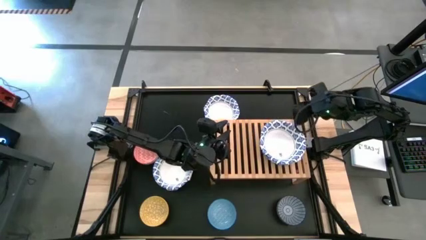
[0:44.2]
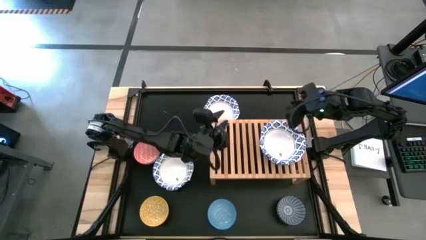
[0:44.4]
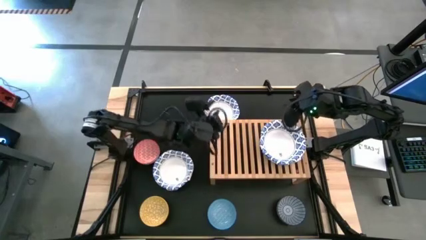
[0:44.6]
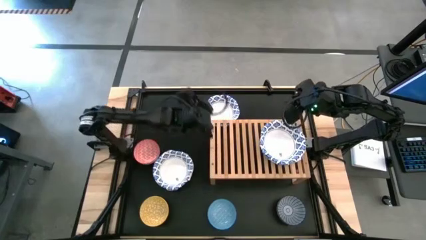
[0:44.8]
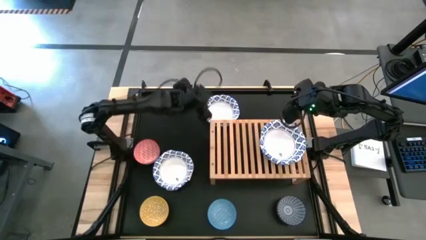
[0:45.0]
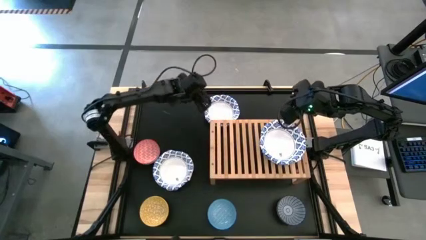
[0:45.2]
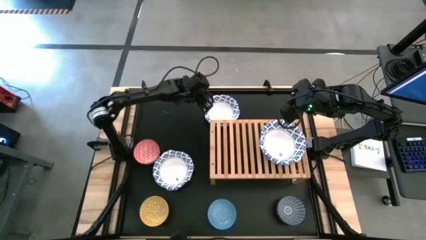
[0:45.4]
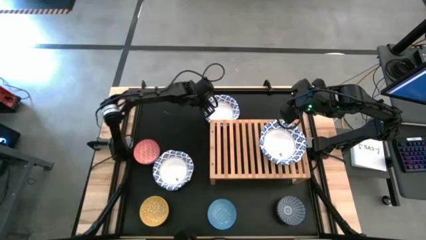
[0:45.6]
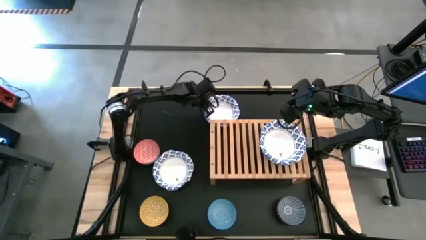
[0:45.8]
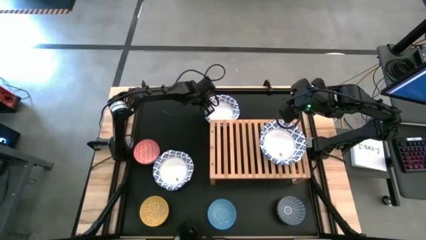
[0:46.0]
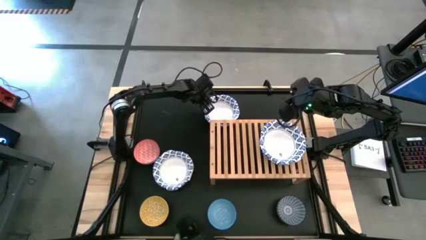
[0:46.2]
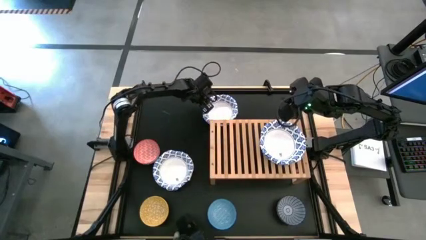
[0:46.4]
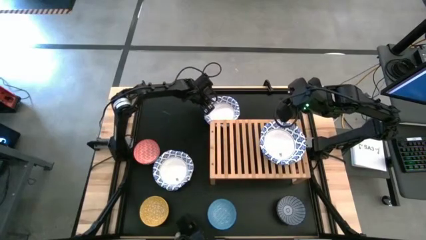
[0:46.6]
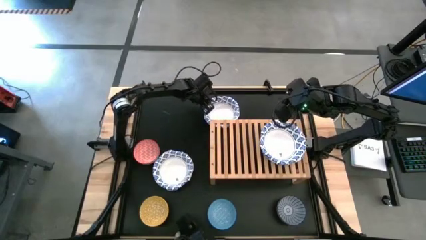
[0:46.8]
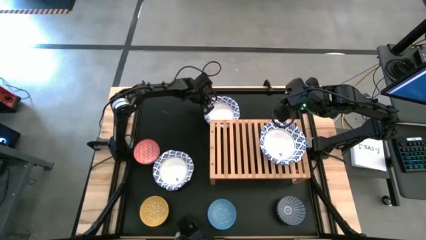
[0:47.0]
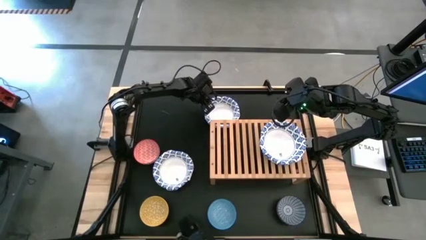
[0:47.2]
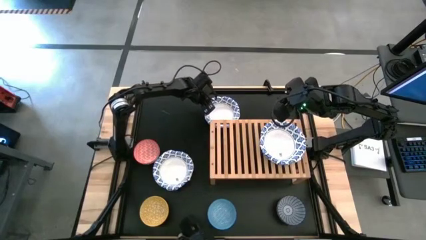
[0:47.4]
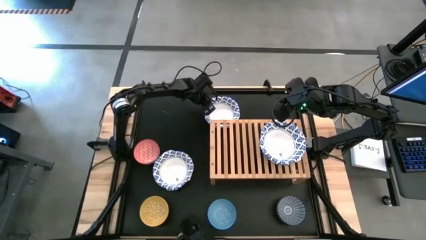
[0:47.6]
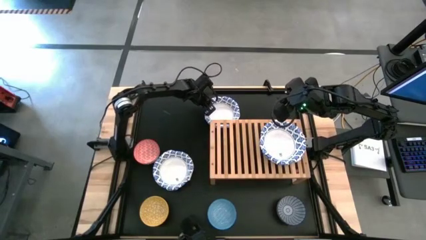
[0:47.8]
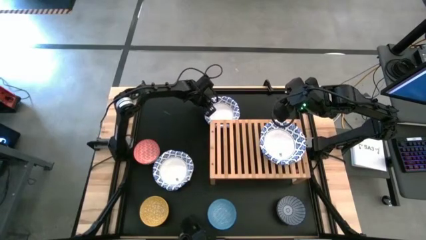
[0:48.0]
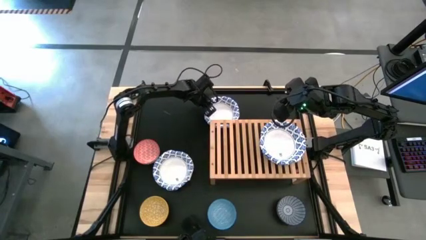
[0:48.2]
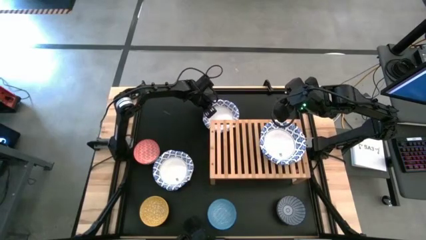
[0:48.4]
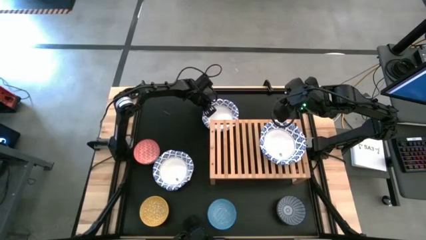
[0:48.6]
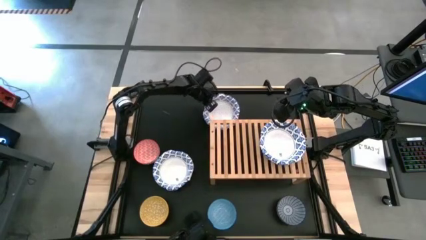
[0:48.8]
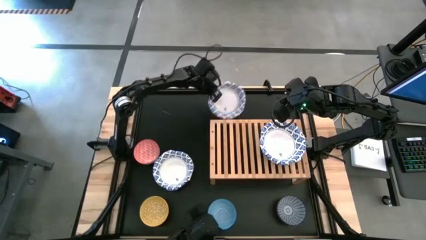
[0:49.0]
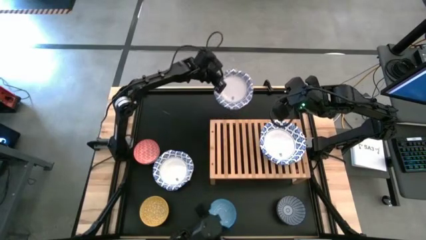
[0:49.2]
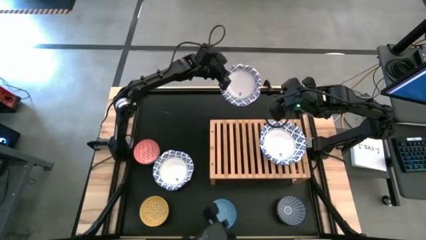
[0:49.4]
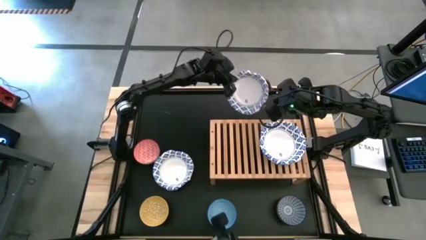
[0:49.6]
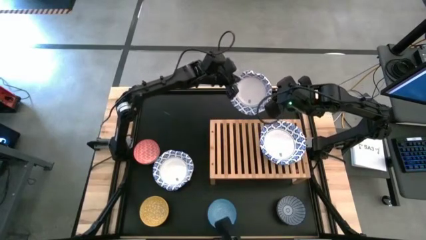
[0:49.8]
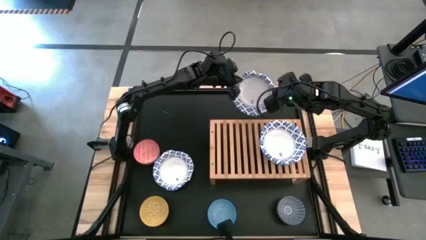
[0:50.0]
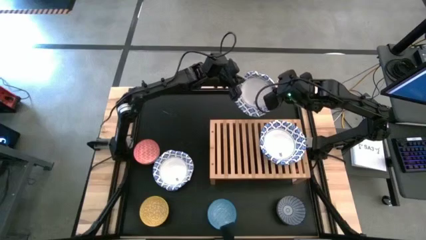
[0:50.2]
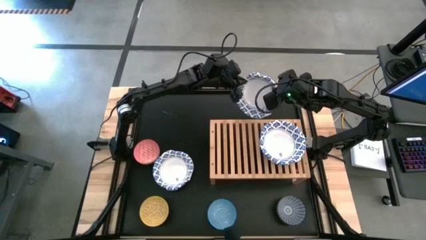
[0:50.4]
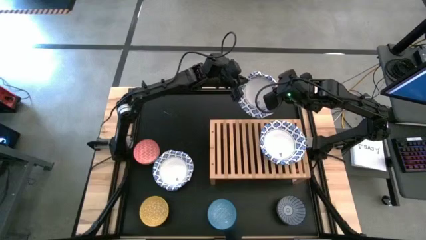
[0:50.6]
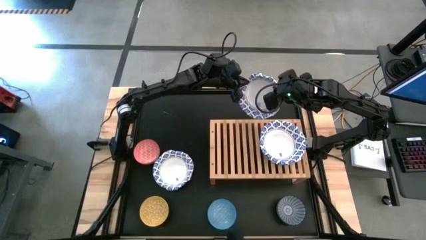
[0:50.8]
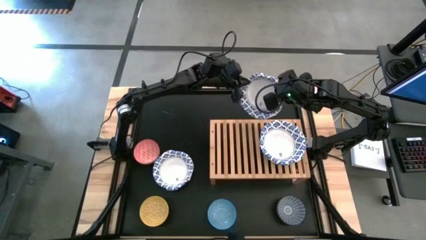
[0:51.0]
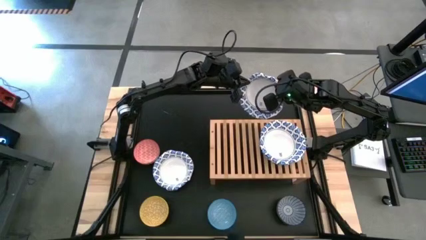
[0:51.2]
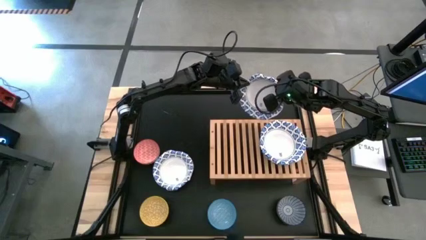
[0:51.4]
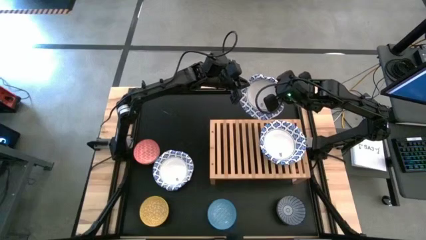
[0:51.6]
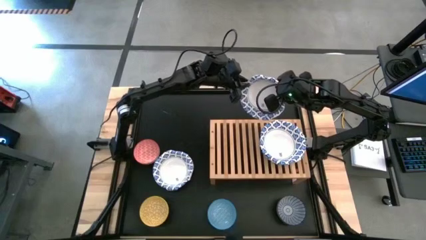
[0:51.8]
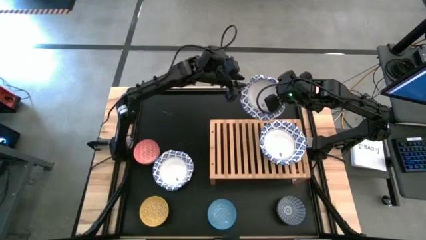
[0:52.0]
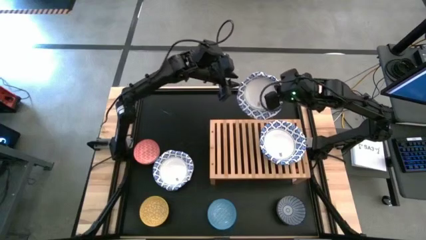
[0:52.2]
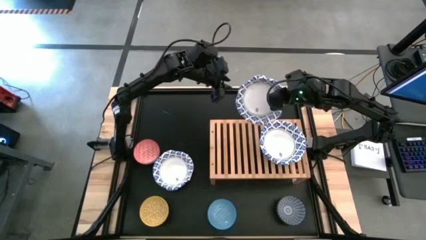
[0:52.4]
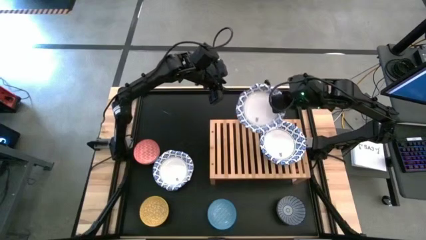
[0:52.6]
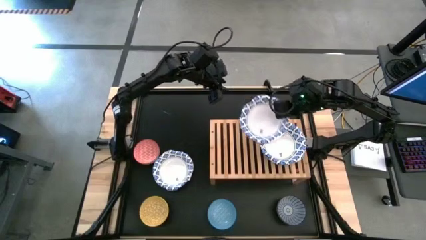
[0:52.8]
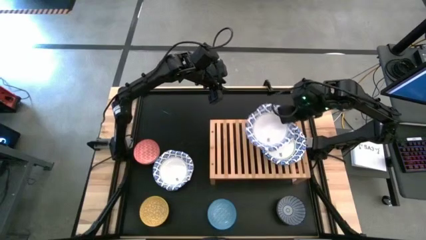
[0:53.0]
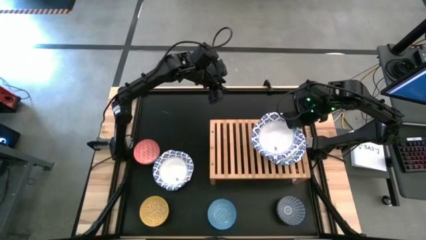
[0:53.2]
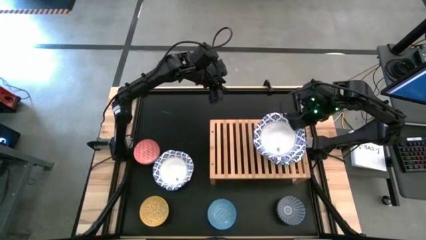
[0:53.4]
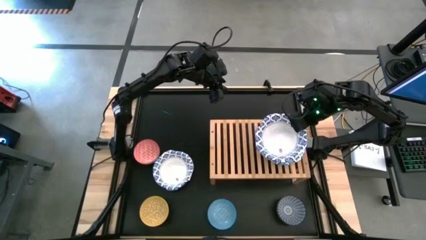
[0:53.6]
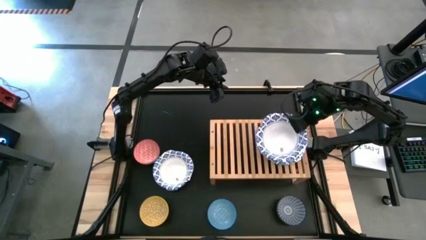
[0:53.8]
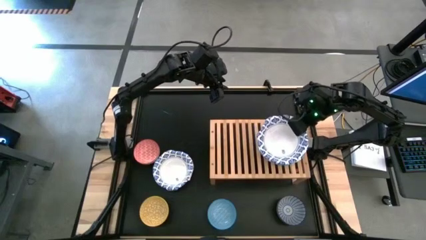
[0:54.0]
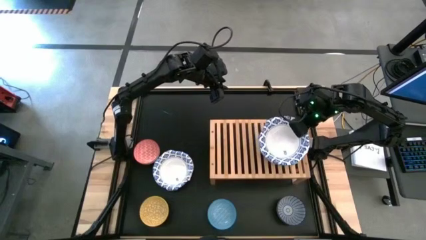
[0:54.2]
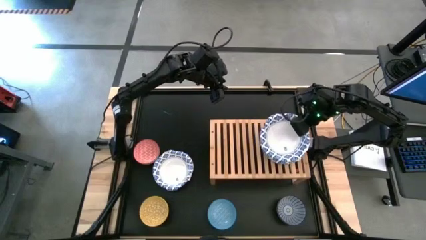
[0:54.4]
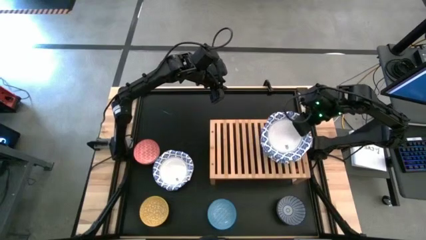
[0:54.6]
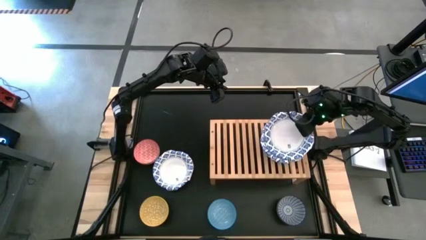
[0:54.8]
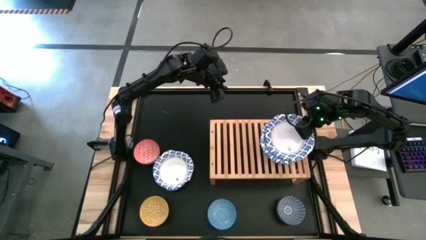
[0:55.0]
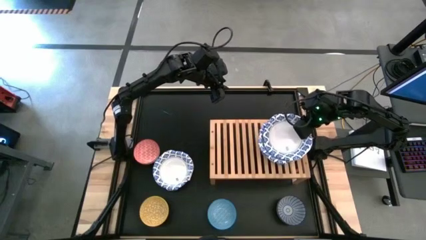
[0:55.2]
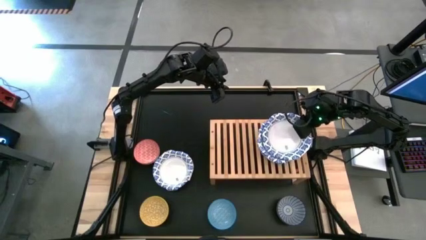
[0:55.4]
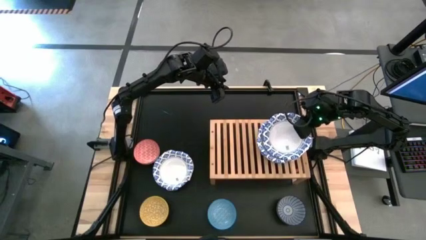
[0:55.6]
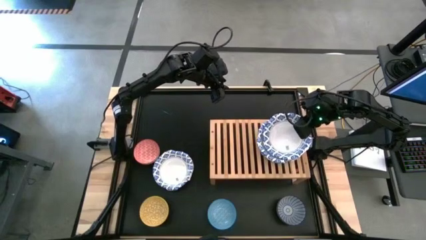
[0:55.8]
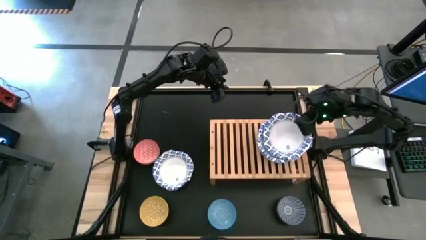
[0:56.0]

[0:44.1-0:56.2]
Task: Place and stack bowls onto a shelf
Stack the top big white and blue bowl on top of the big white and blue bowl

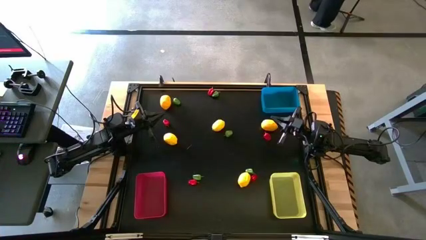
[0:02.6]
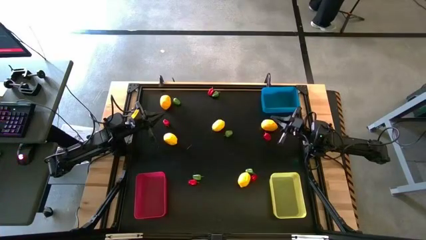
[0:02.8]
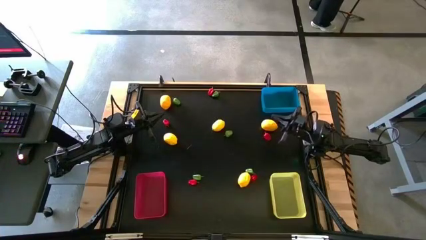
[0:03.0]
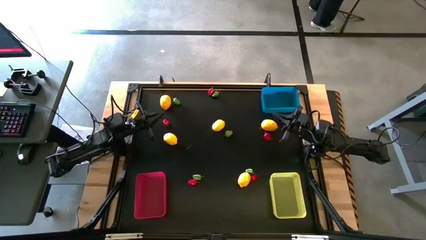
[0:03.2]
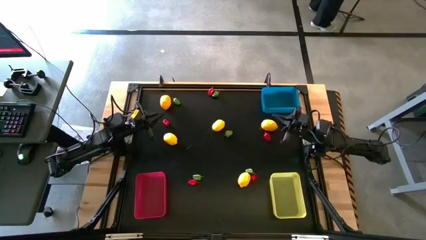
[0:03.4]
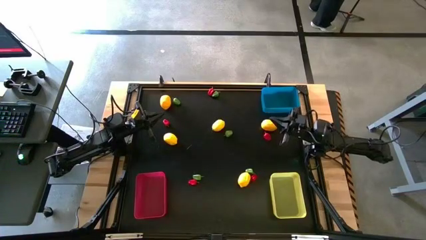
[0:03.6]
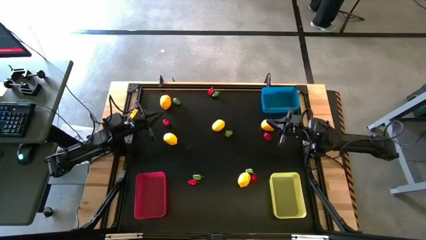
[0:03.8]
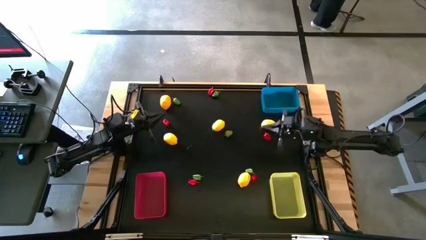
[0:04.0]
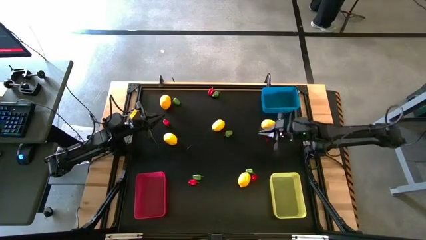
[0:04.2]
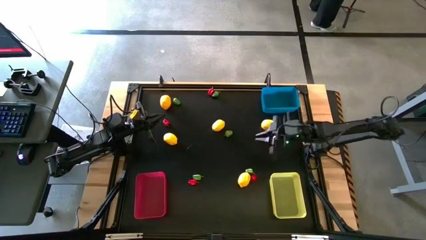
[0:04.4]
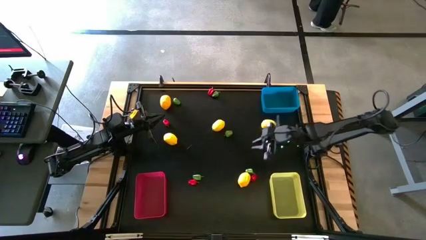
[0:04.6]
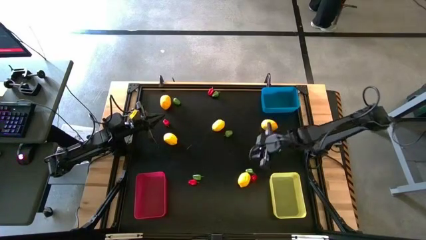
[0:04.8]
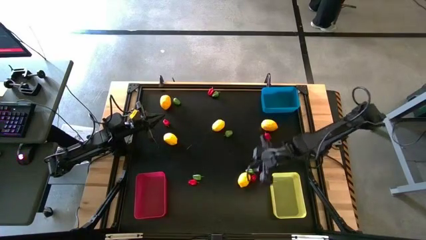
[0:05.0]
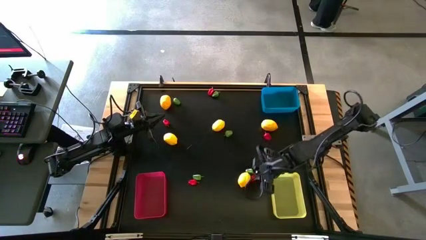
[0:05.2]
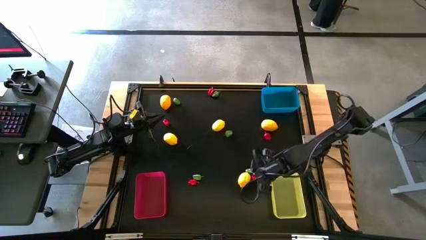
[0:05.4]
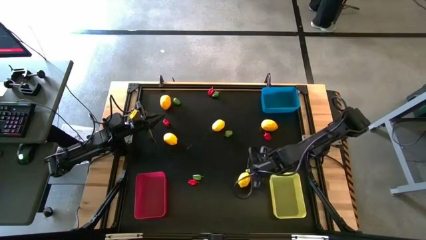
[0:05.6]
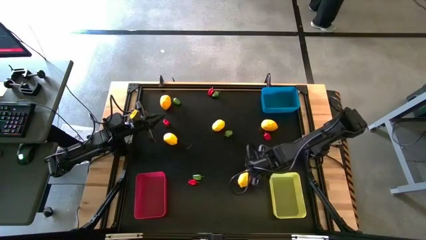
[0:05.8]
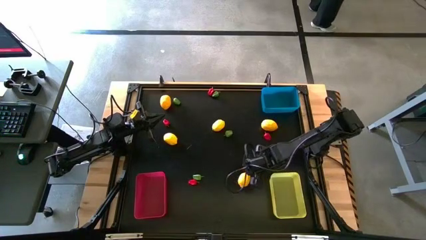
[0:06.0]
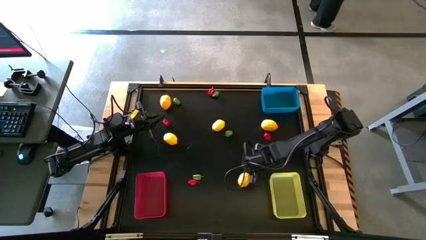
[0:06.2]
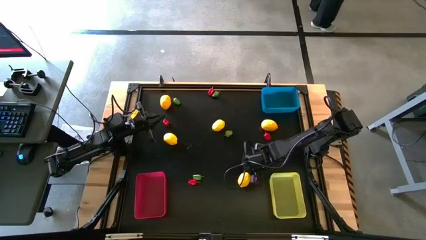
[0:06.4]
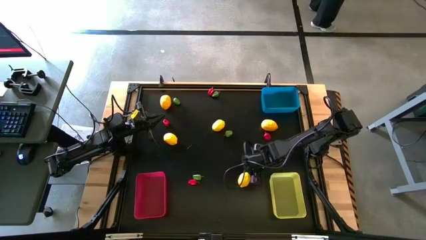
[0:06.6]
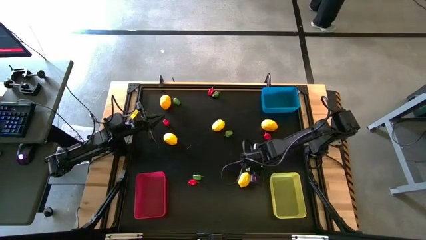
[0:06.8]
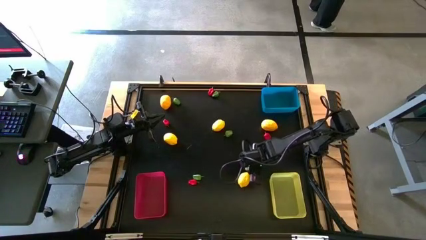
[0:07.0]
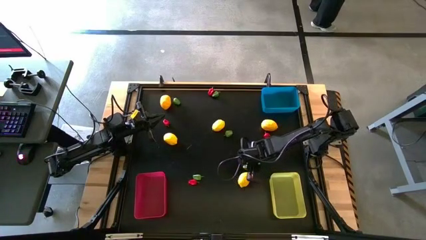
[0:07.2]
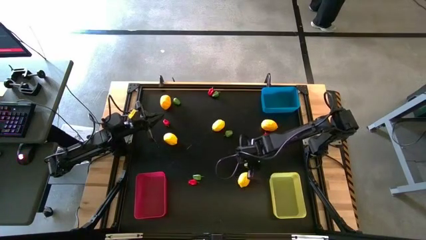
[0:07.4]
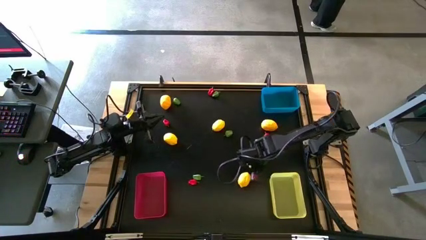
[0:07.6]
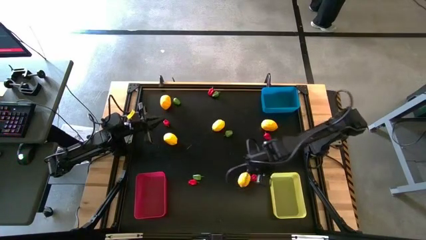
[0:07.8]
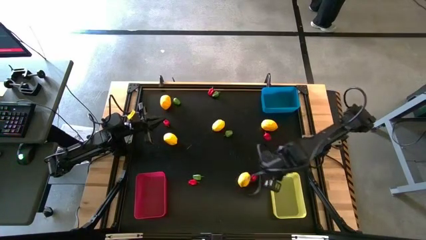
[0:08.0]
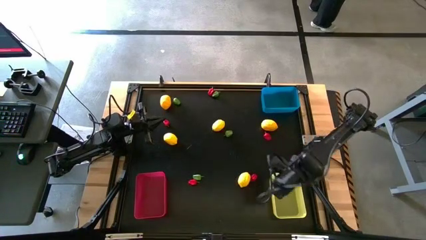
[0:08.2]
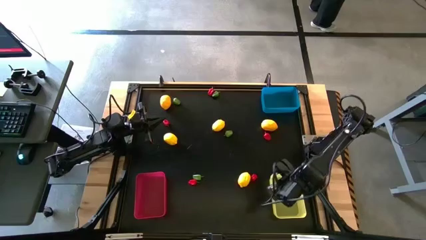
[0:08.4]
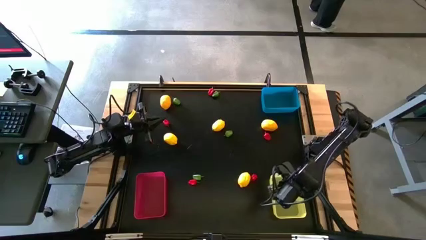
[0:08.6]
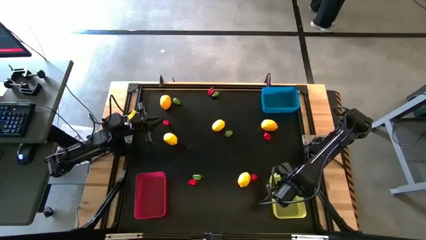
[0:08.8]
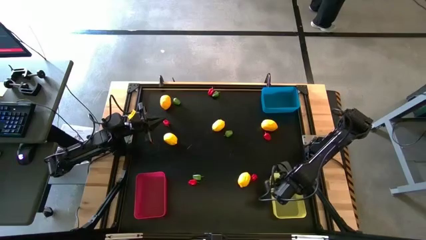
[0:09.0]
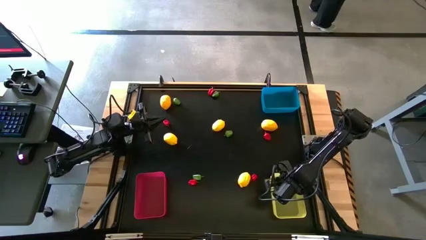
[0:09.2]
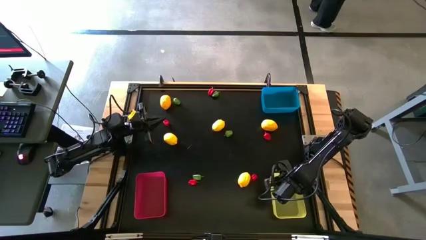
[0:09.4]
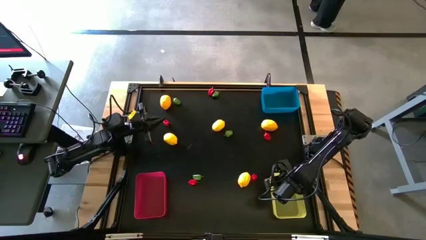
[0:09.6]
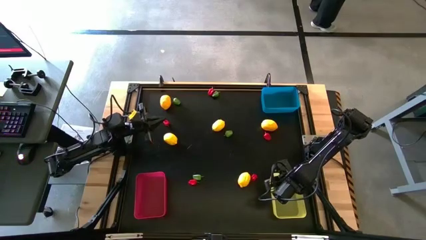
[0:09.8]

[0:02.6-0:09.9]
Task: Sort produce into baskets
Put the green chili pepper into the yellow bin
